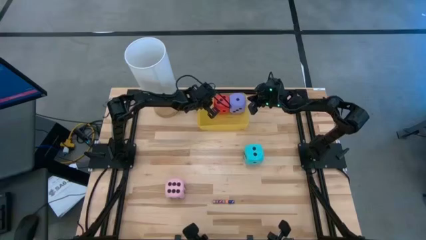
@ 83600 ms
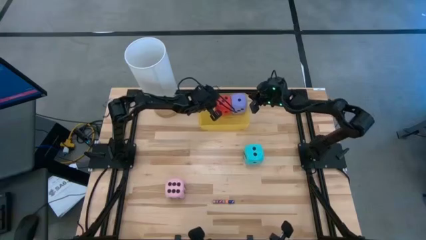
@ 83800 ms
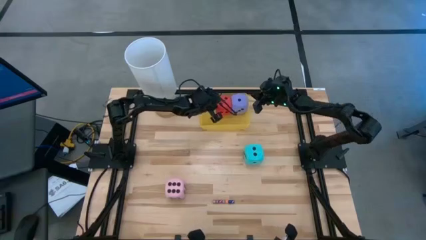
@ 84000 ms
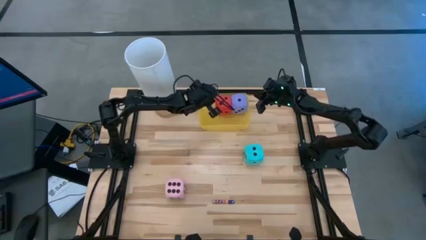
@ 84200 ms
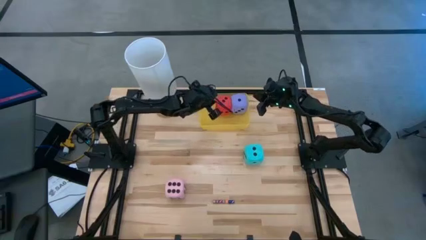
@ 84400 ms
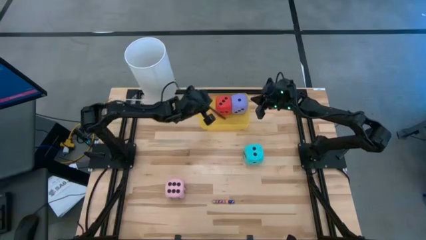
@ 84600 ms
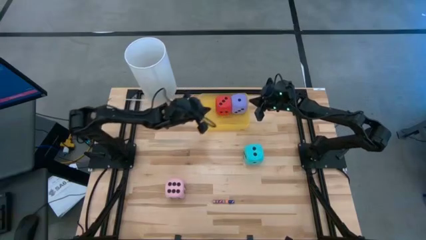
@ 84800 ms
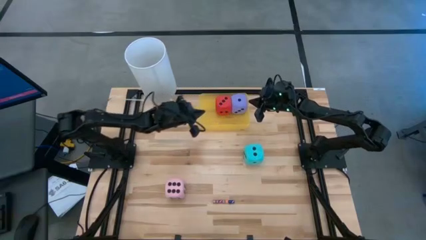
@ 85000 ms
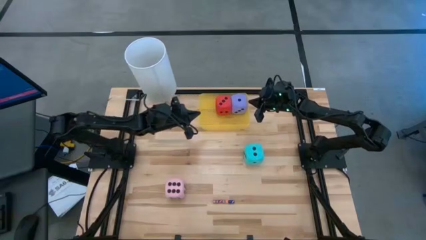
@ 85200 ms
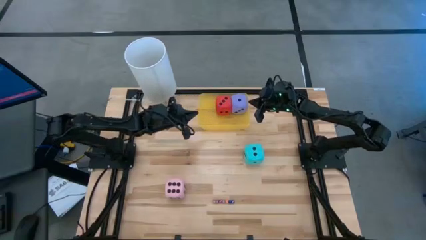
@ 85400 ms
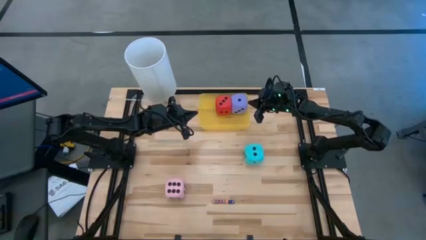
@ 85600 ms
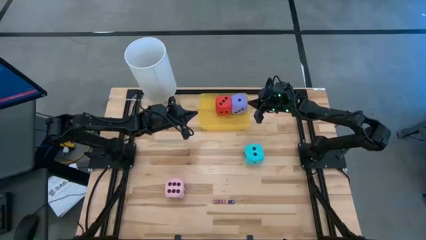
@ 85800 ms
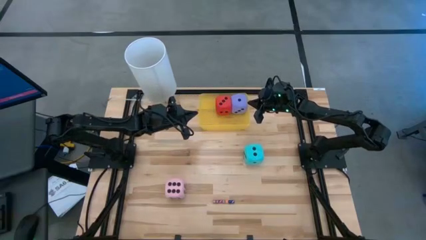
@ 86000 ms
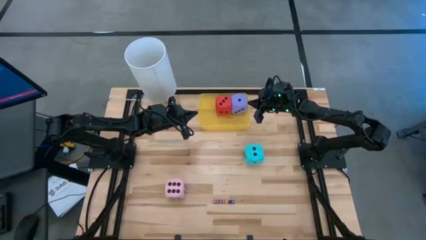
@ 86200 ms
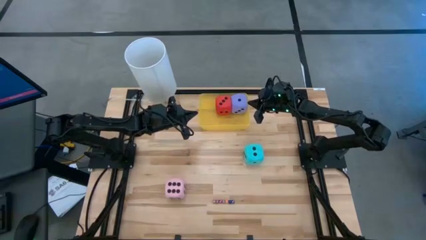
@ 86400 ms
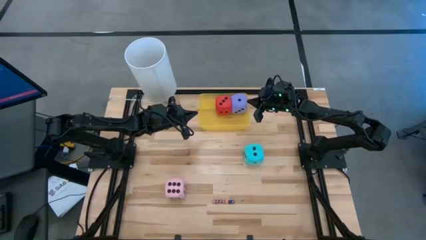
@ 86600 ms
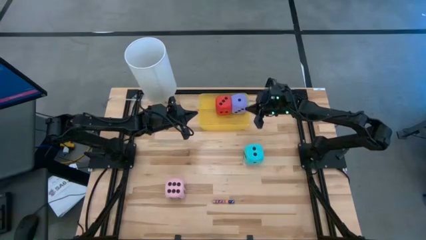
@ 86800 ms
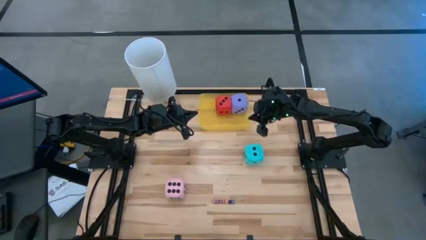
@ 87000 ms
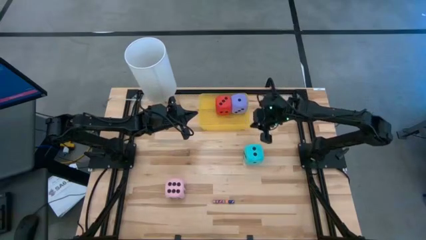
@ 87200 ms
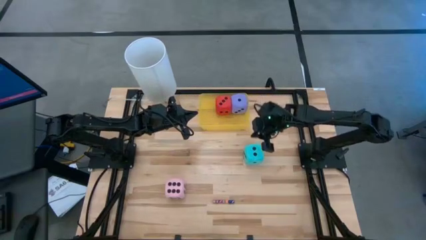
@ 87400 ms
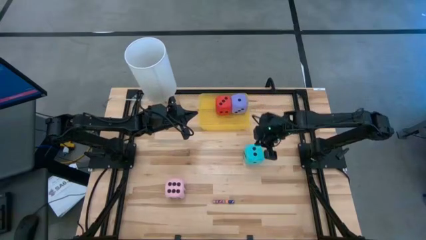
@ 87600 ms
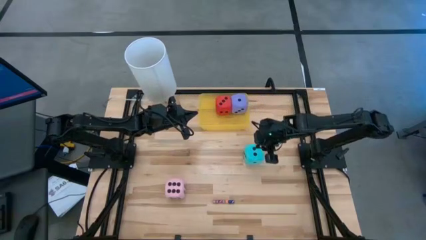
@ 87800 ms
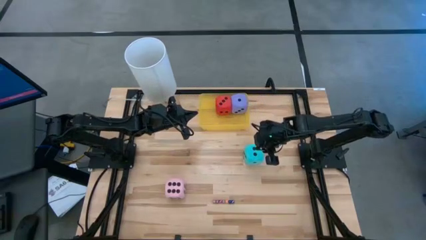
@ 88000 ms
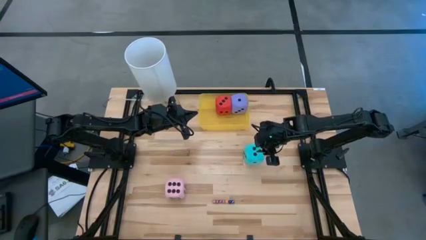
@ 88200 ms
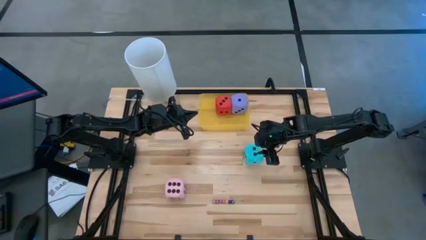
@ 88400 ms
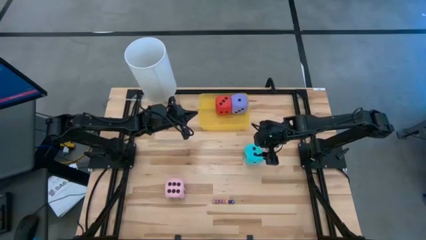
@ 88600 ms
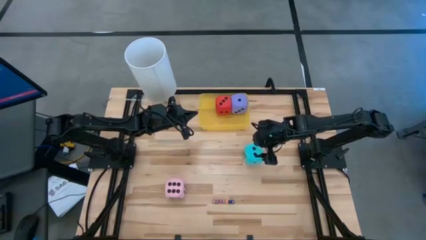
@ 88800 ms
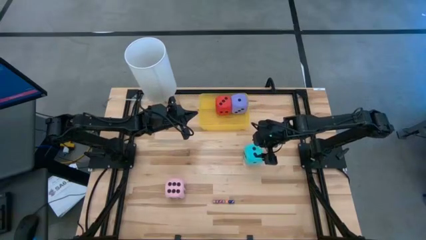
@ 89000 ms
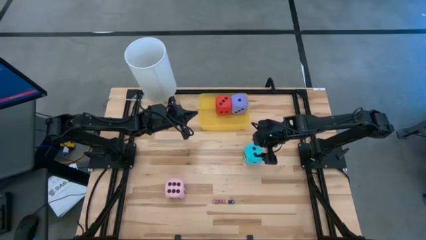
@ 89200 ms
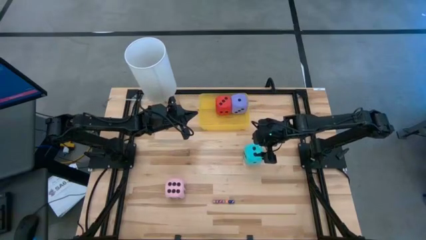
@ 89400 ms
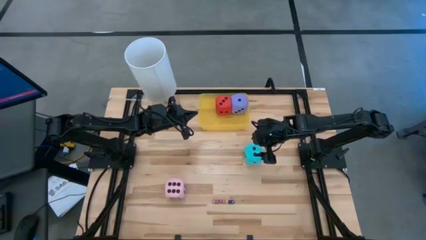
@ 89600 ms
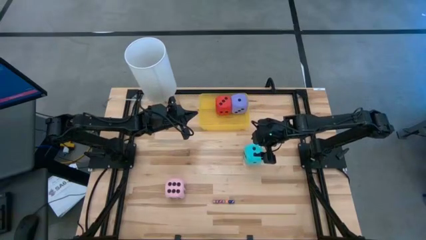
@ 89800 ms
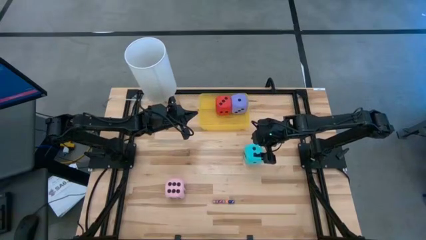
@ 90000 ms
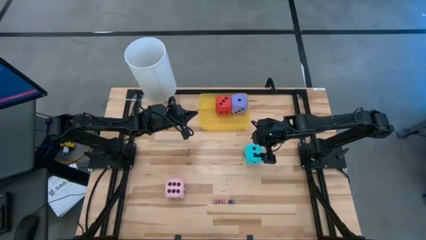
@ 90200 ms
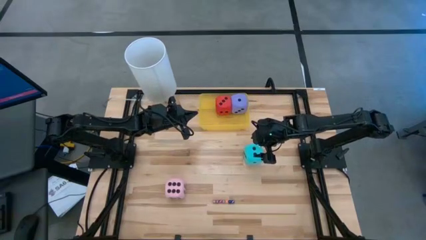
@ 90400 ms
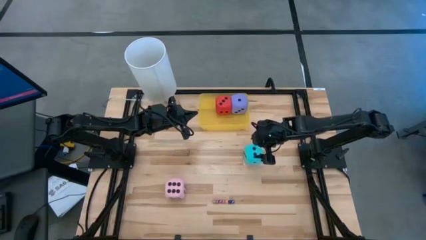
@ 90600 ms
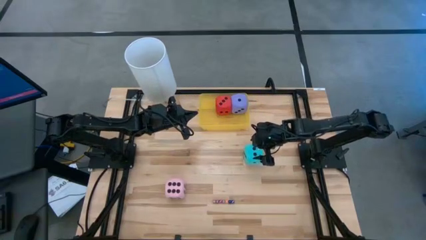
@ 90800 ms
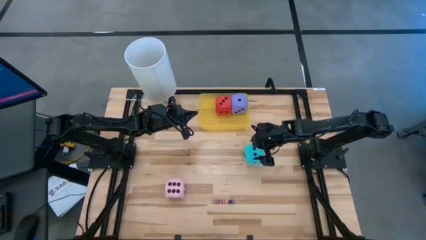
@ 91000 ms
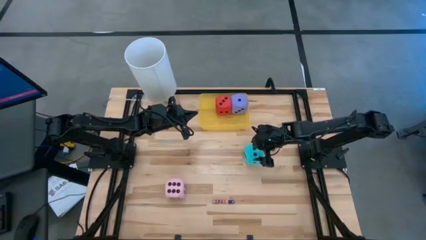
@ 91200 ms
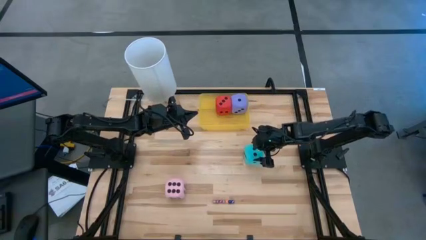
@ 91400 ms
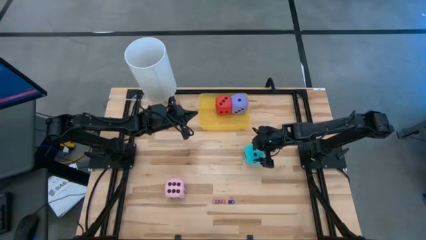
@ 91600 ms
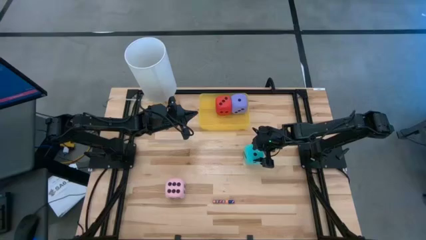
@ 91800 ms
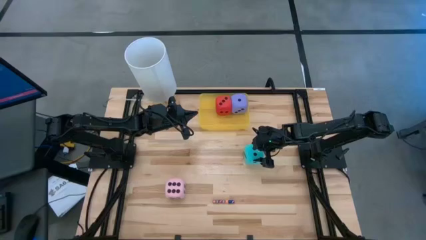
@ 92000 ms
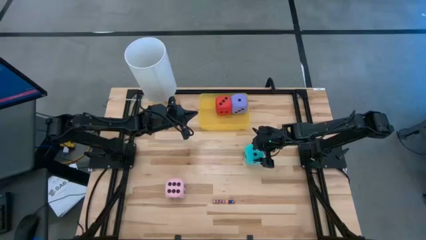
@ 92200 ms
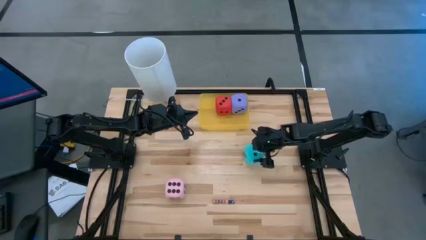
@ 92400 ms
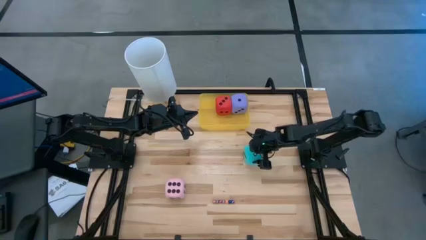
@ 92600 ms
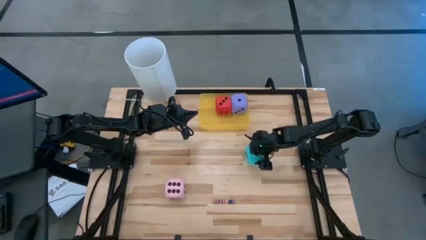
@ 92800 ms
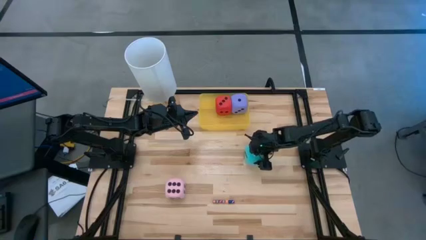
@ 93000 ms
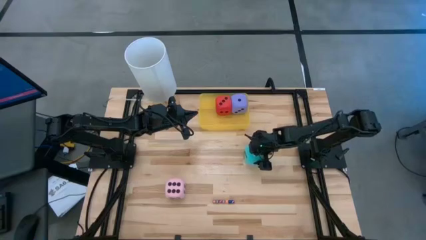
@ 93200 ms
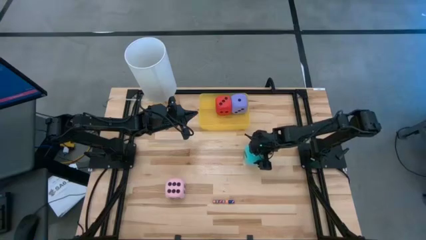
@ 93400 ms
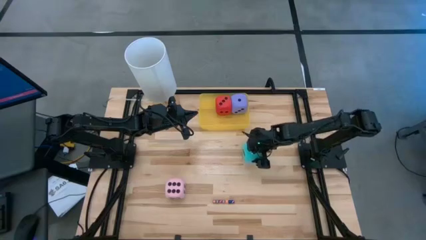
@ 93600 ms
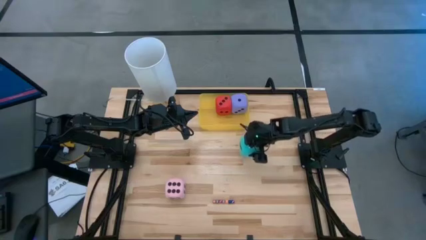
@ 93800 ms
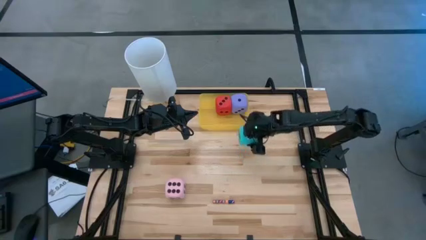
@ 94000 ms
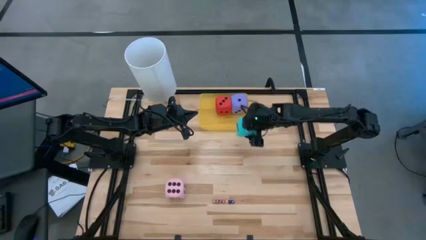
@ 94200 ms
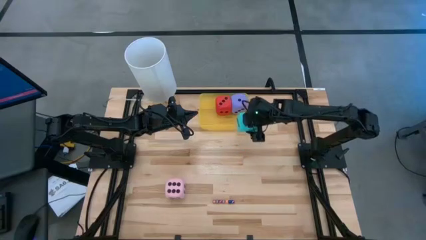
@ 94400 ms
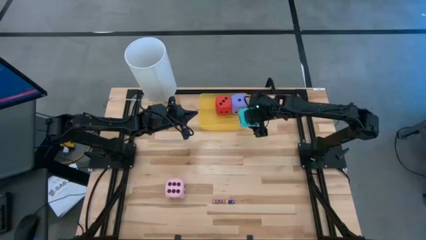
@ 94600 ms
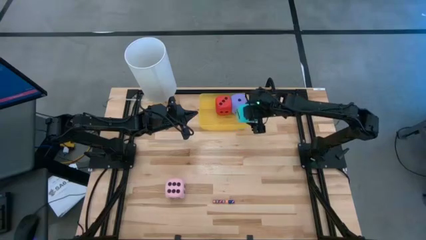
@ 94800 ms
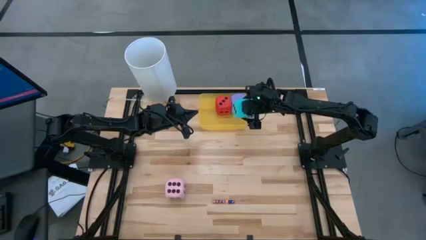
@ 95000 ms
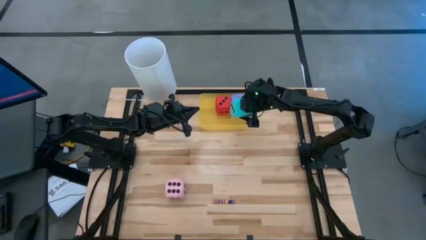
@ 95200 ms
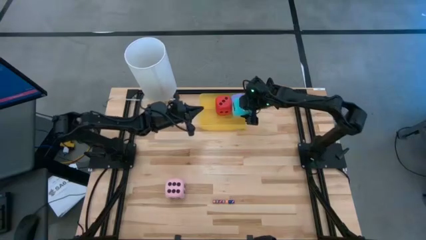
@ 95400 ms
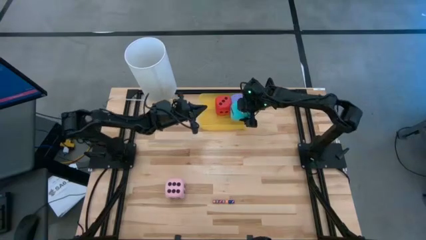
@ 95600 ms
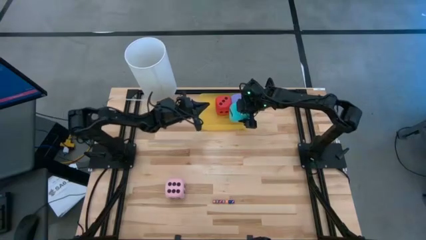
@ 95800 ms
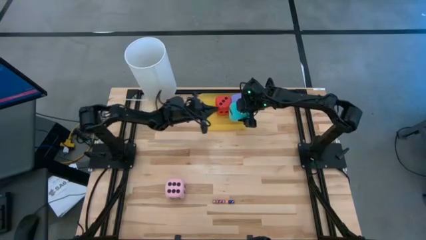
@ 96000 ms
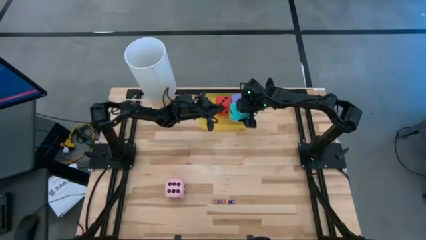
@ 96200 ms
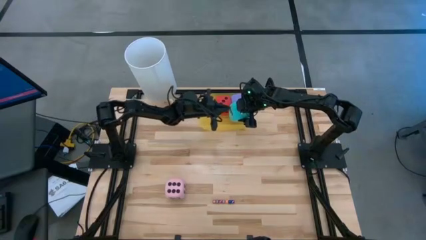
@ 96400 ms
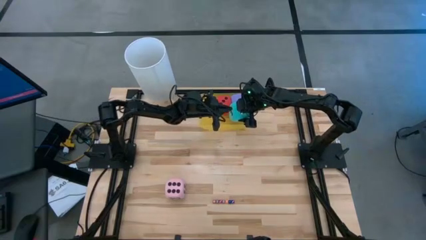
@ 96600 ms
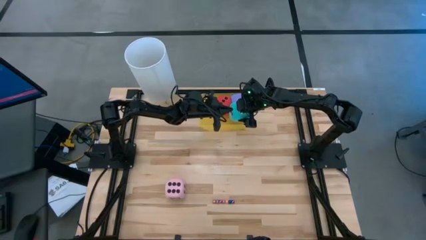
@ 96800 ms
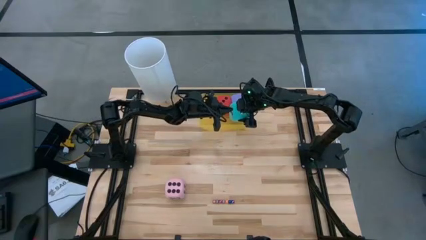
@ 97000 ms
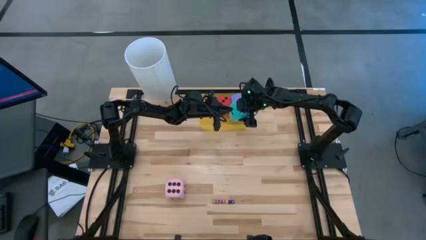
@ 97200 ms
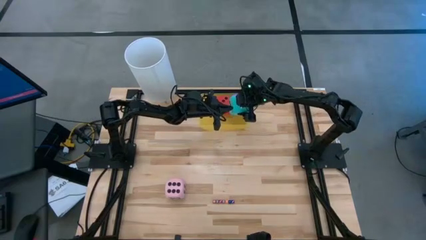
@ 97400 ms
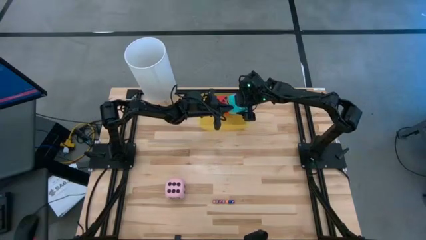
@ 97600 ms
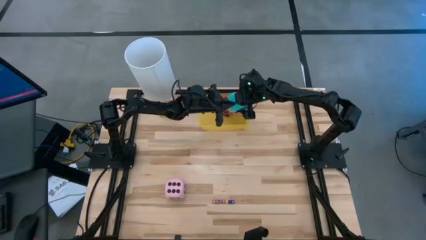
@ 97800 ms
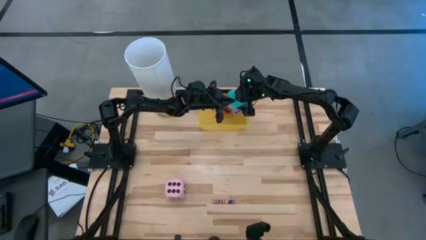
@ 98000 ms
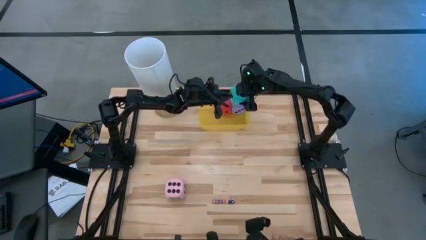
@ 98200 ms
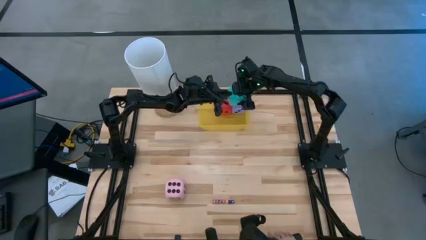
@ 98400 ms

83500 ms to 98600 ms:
Task: Pick & Place Dice
Put the big light blue dice into the yellow bin
